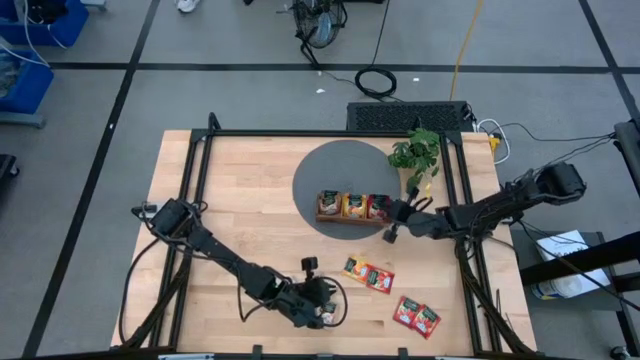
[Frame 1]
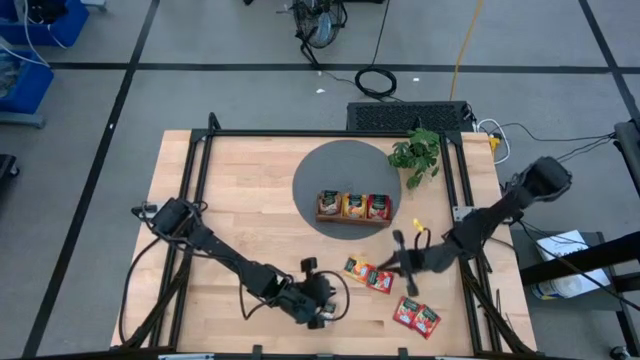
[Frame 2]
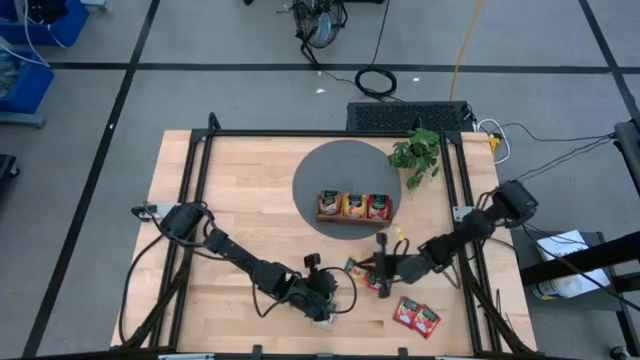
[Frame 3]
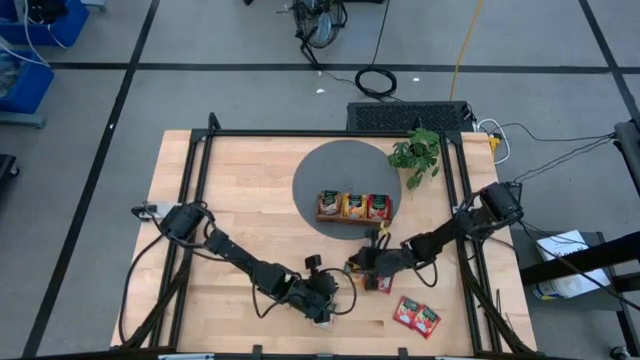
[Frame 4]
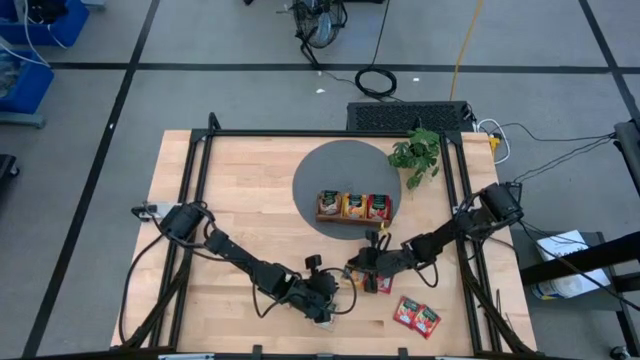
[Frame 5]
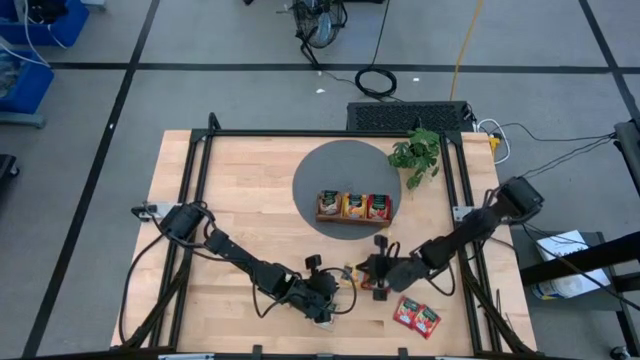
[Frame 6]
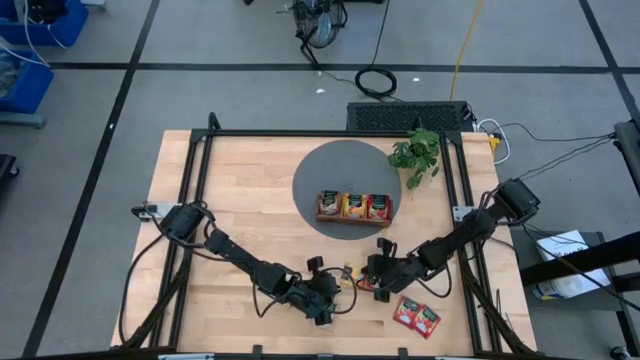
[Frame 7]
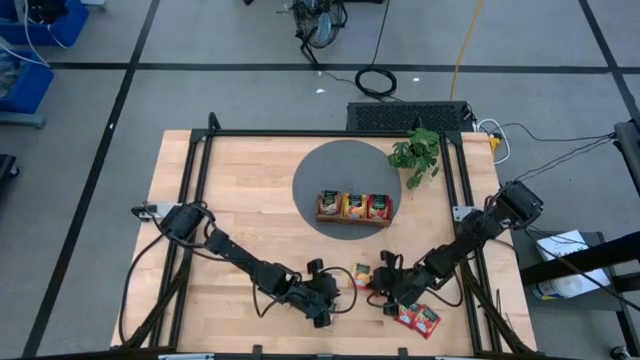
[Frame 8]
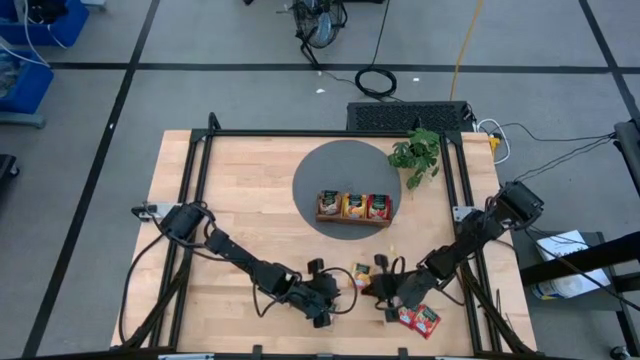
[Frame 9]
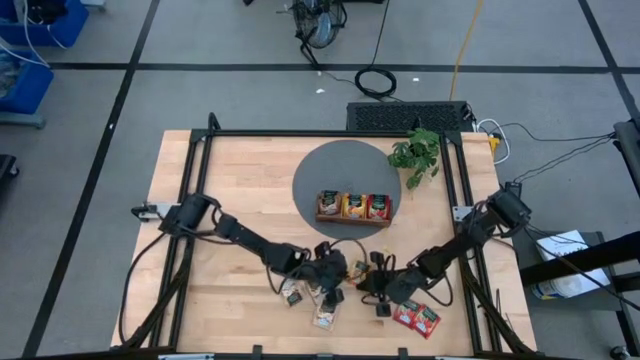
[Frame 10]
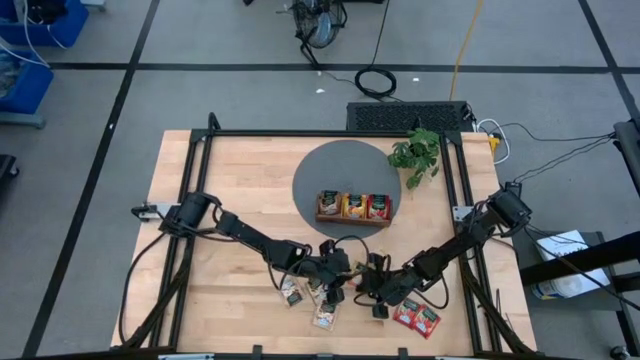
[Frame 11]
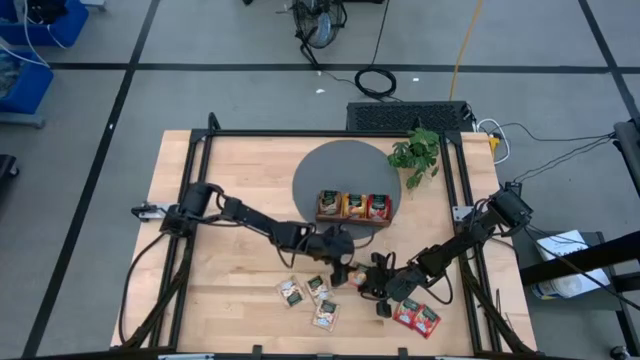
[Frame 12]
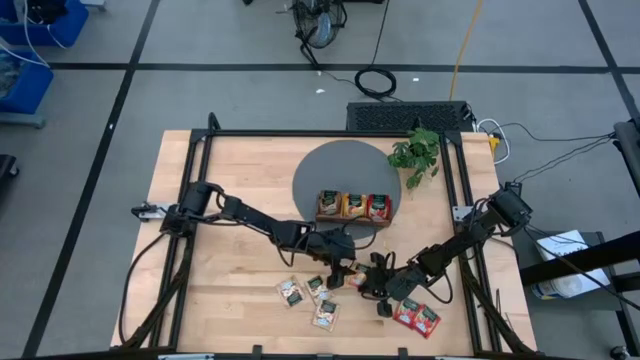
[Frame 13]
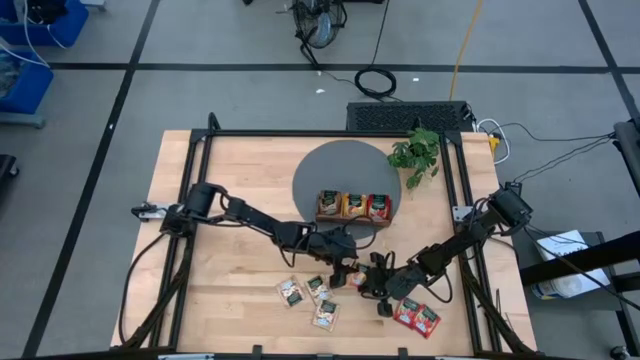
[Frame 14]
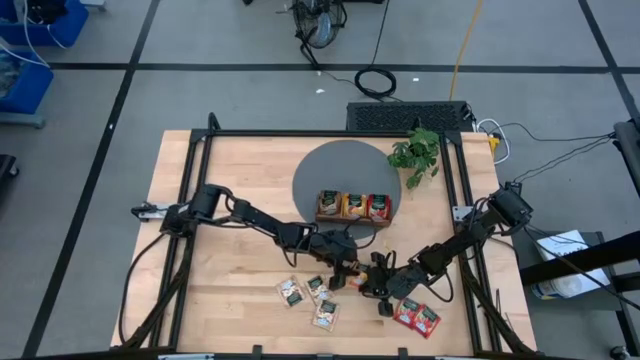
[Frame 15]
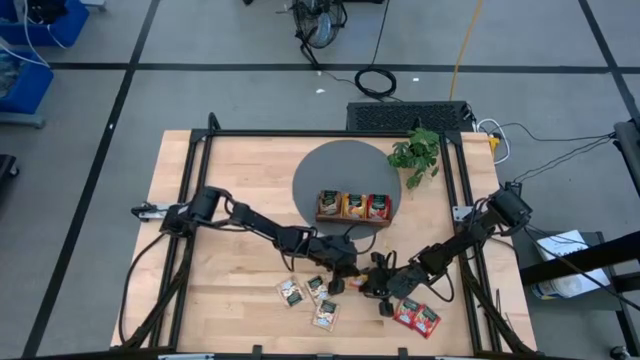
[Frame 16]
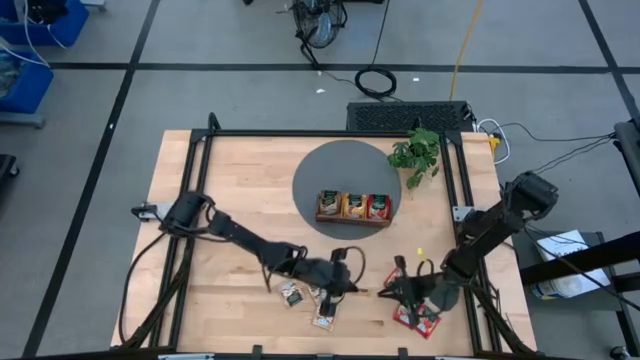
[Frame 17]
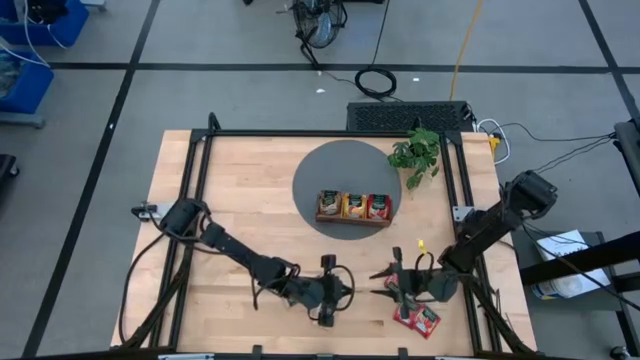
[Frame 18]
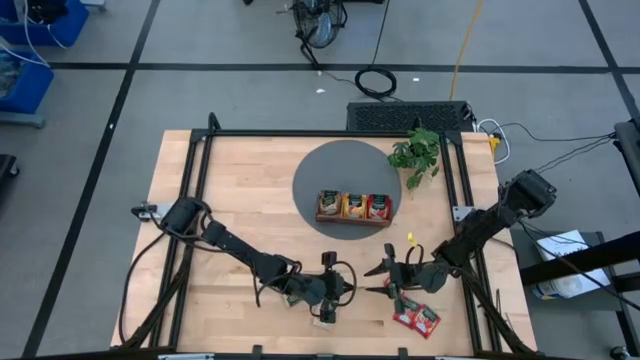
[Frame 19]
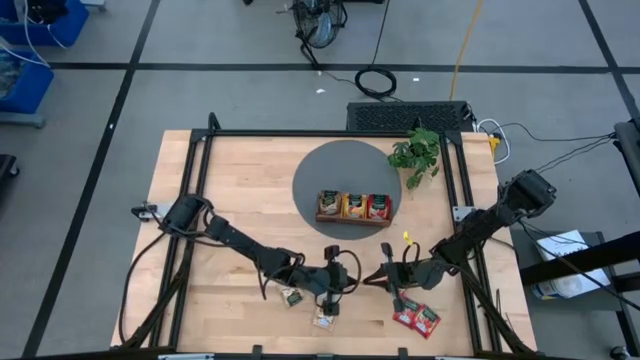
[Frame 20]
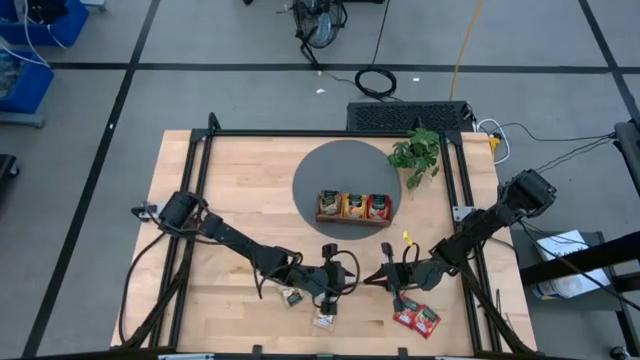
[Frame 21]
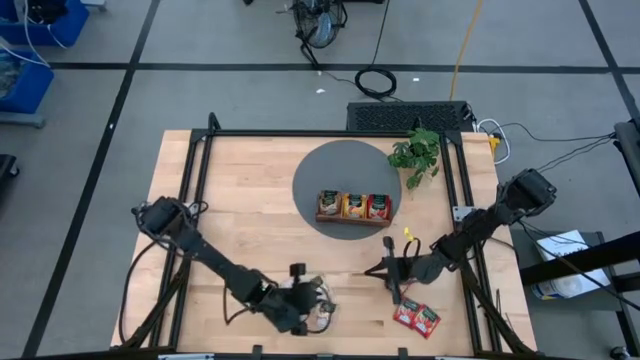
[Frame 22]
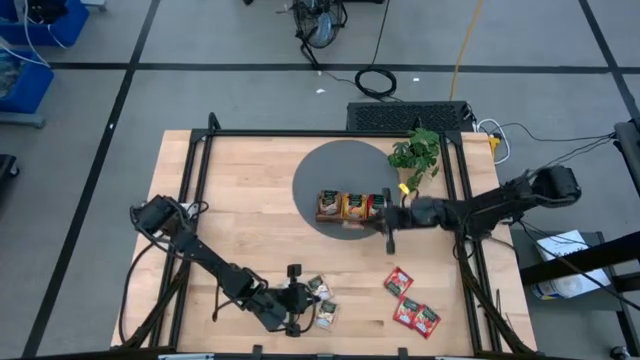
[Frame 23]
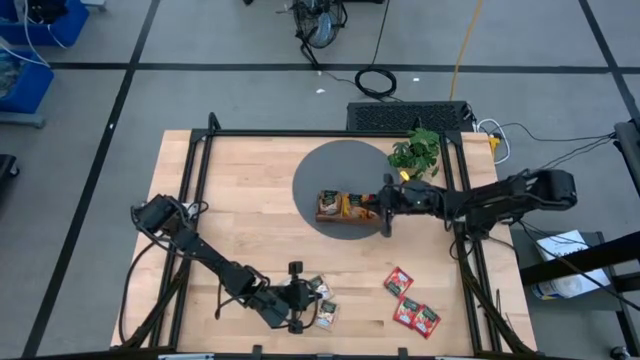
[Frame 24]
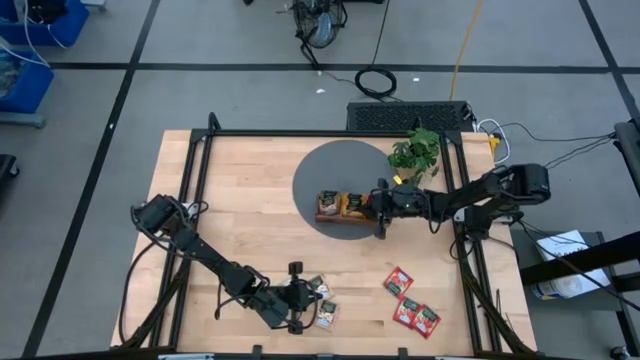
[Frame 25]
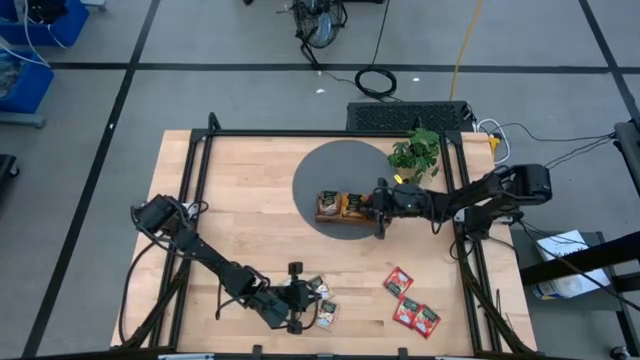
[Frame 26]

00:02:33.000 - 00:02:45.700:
Task: Pick & Place Tea
Put the yellow tea bag into the middle section of the wooden organiser

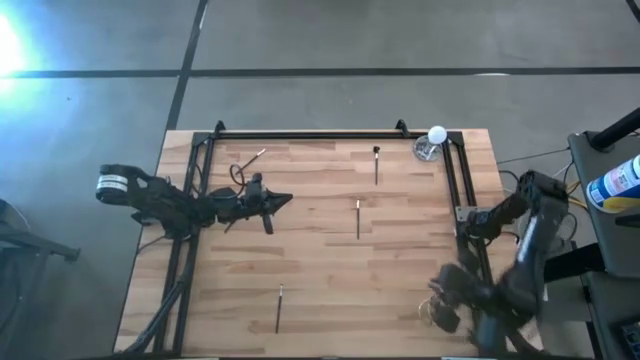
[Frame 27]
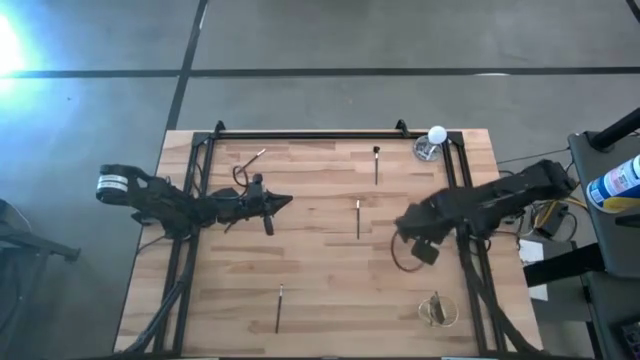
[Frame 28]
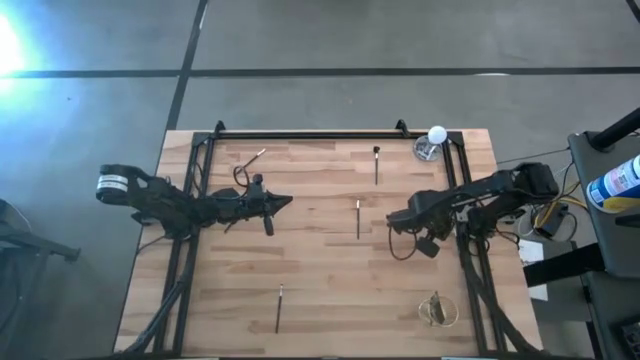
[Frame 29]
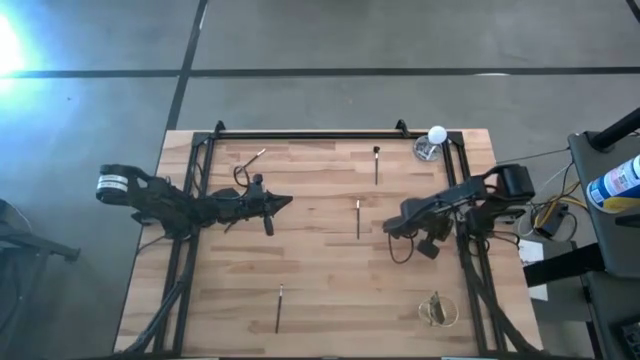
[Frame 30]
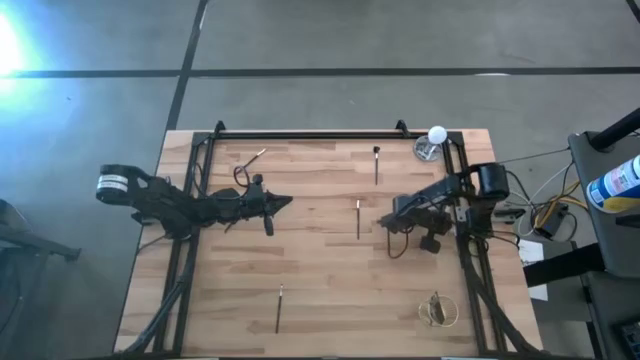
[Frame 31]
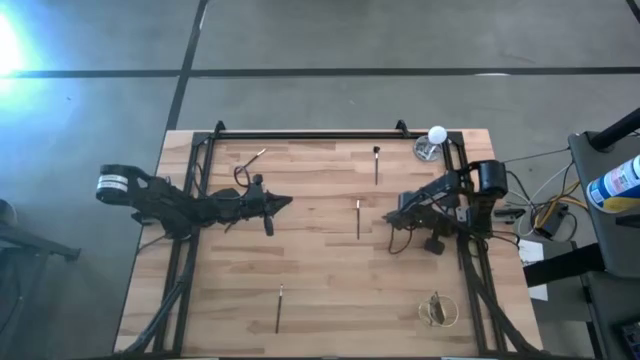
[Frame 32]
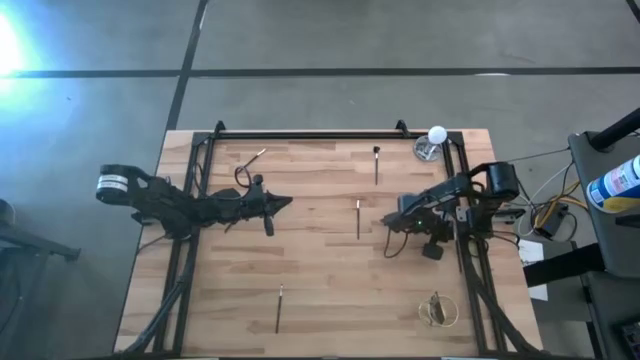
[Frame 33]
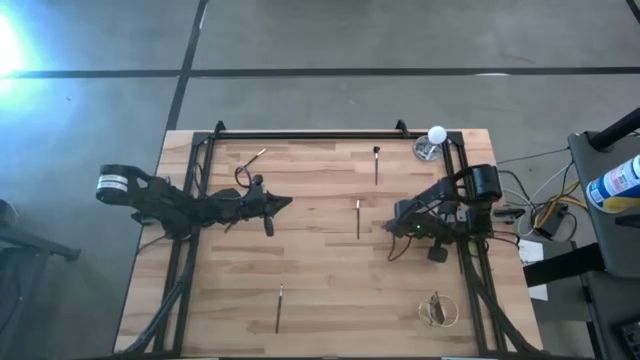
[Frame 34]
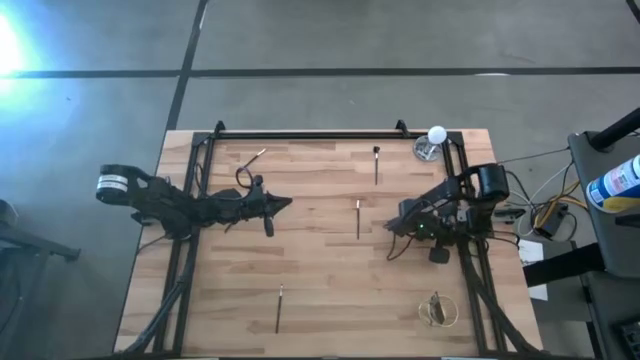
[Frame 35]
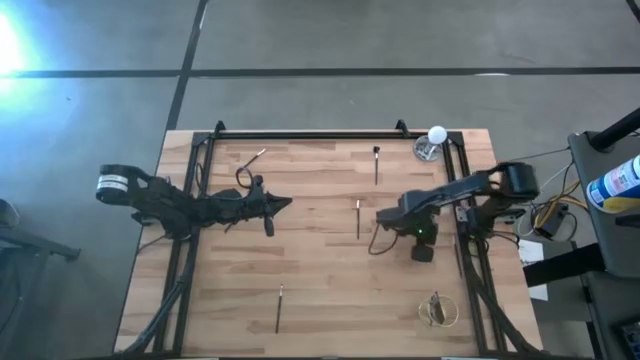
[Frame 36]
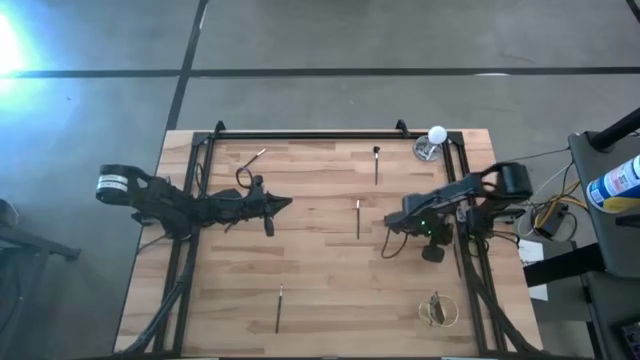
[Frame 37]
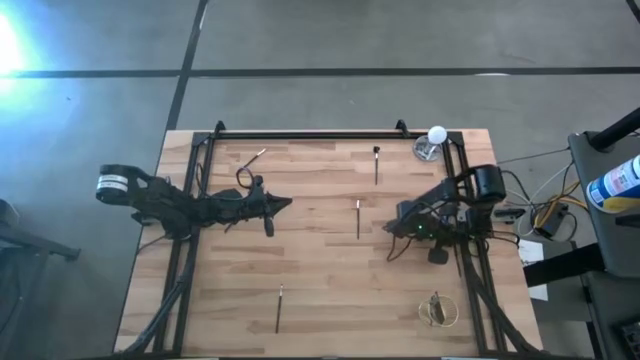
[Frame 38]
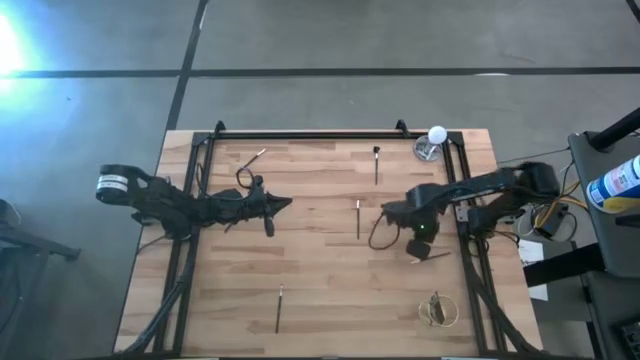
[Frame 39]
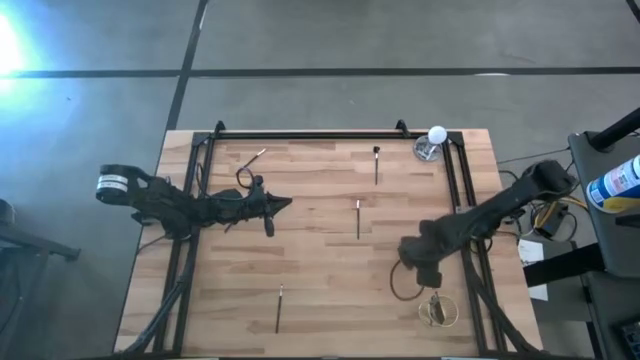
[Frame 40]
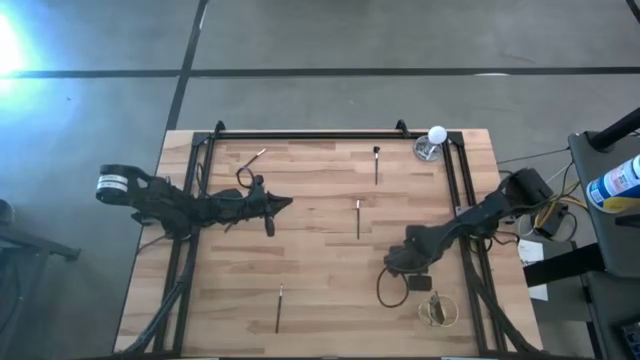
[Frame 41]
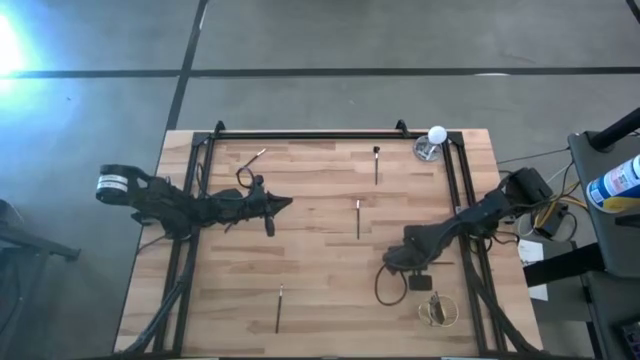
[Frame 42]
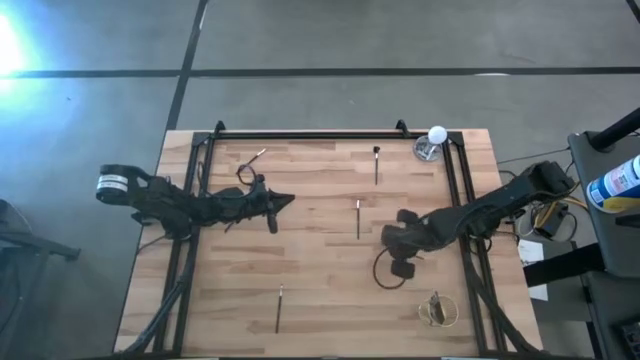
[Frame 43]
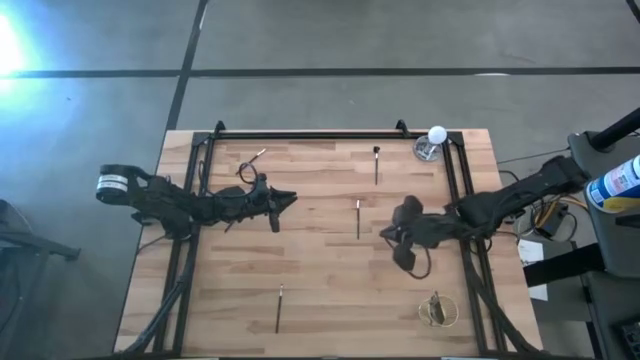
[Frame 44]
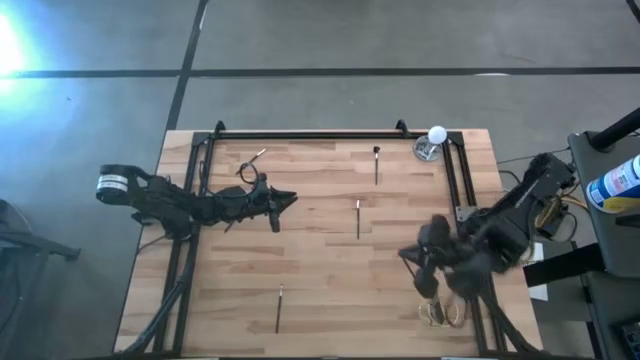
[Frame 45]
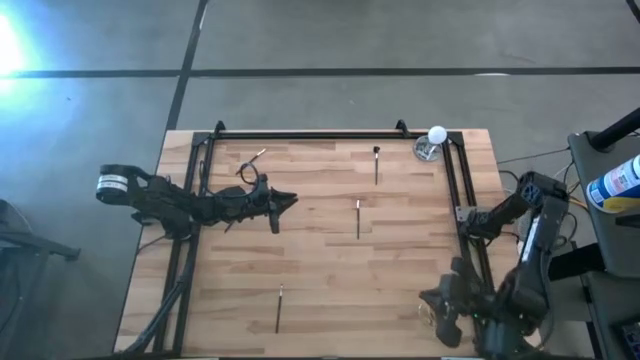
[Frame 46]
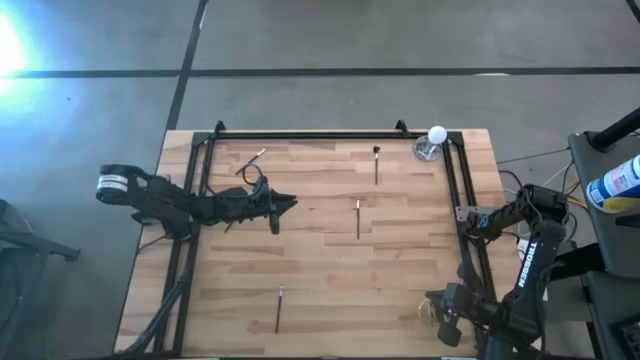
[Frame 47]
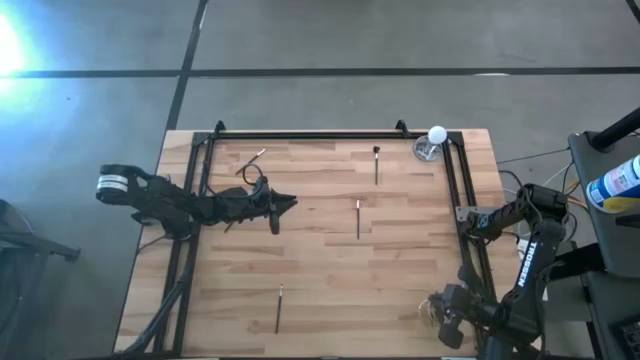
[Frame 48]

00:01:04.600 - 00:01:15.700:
Task: Pick & Place Makeup Brushes
Put the liner brush into the makeup brush holder
